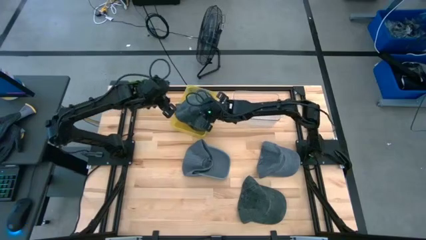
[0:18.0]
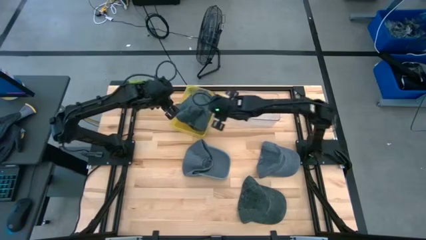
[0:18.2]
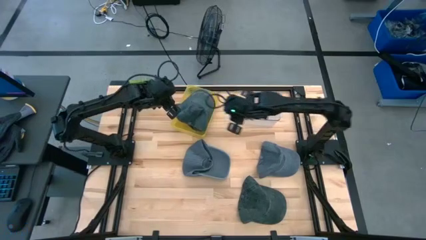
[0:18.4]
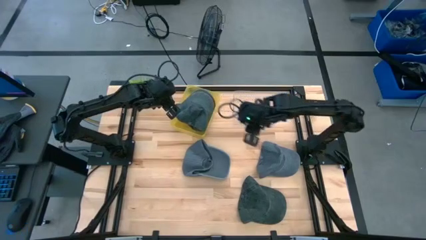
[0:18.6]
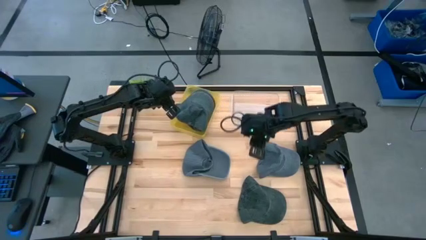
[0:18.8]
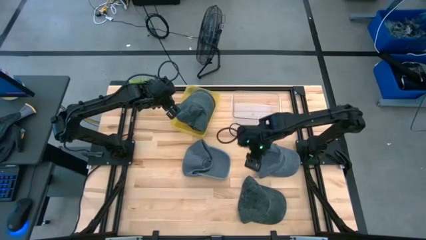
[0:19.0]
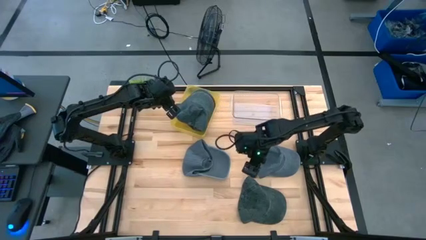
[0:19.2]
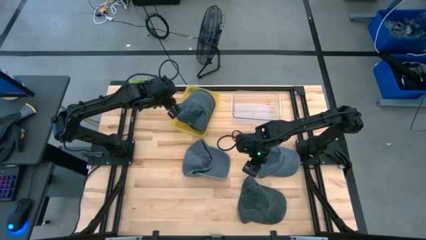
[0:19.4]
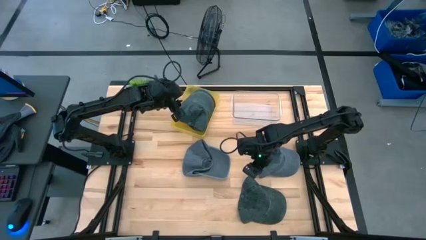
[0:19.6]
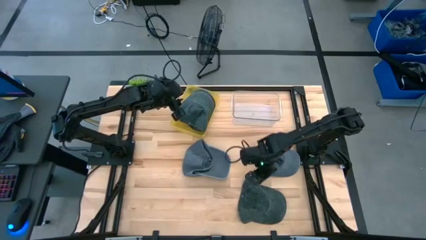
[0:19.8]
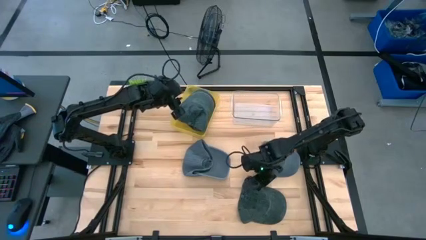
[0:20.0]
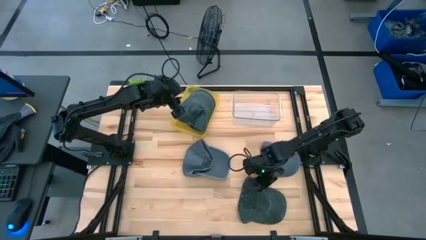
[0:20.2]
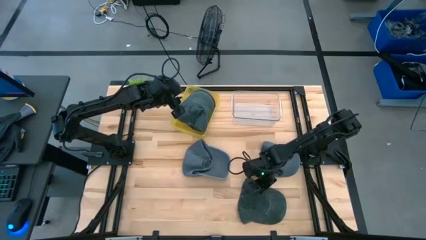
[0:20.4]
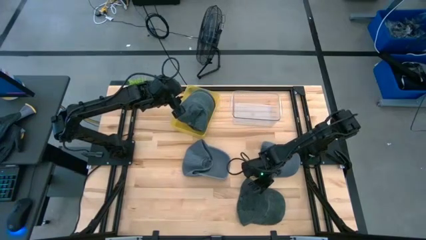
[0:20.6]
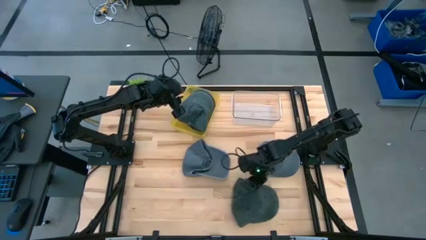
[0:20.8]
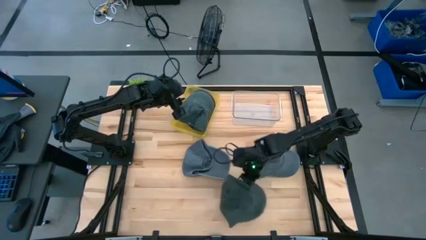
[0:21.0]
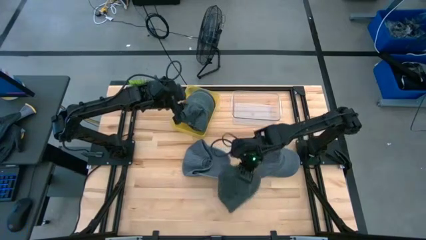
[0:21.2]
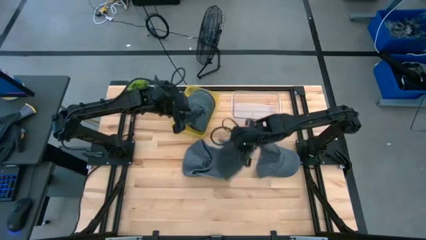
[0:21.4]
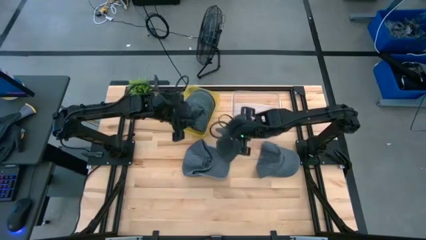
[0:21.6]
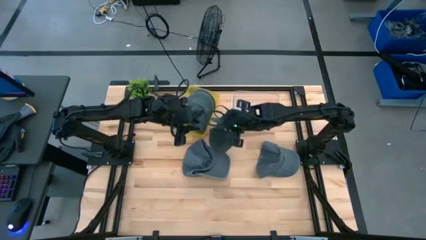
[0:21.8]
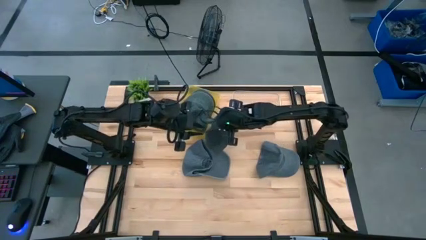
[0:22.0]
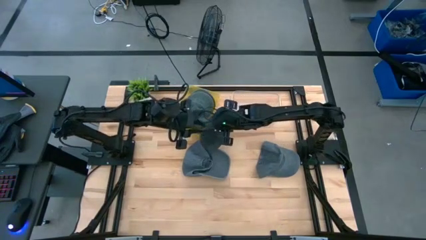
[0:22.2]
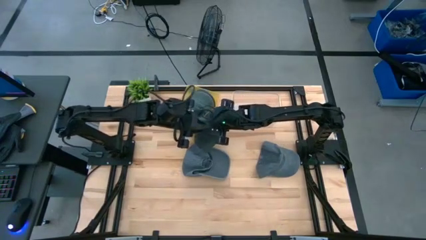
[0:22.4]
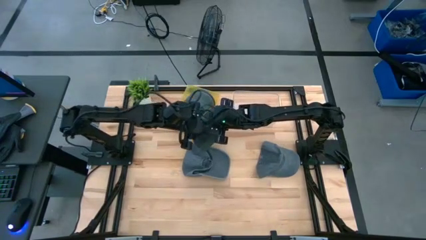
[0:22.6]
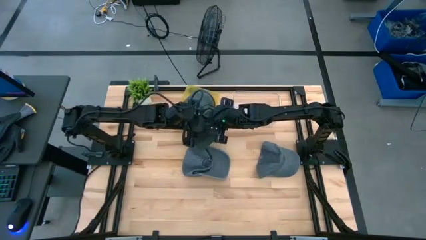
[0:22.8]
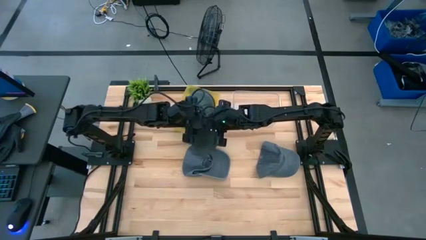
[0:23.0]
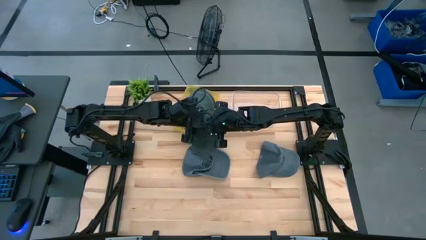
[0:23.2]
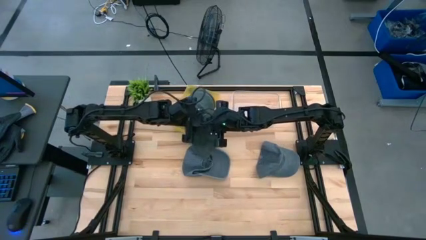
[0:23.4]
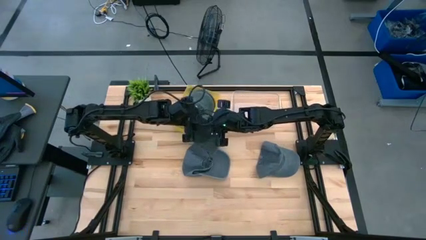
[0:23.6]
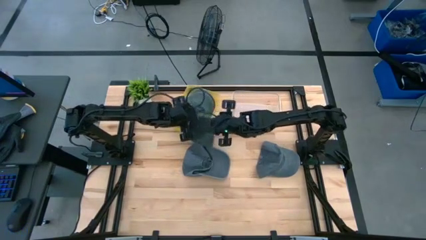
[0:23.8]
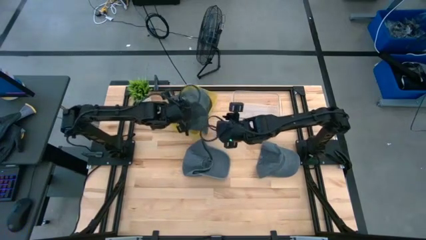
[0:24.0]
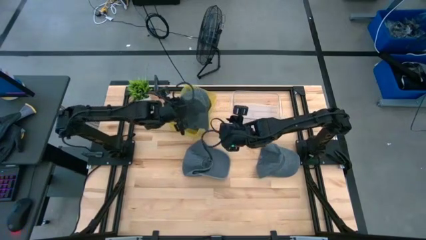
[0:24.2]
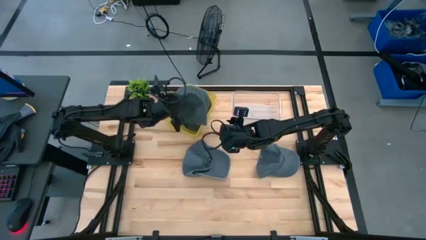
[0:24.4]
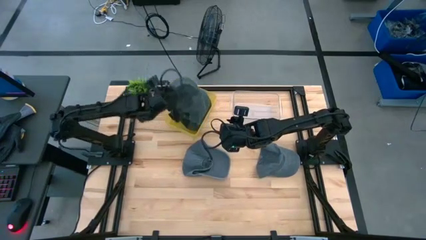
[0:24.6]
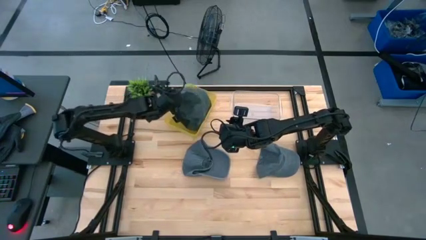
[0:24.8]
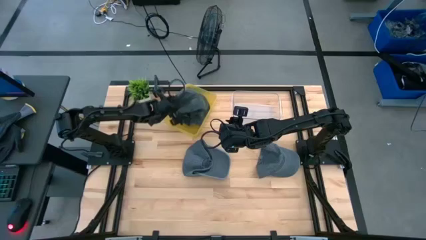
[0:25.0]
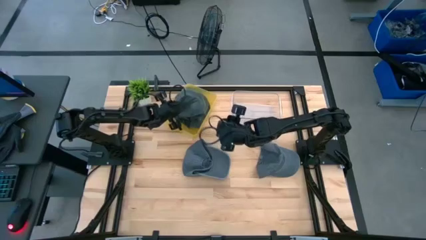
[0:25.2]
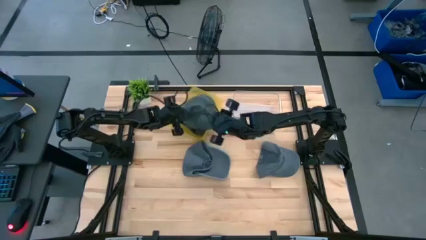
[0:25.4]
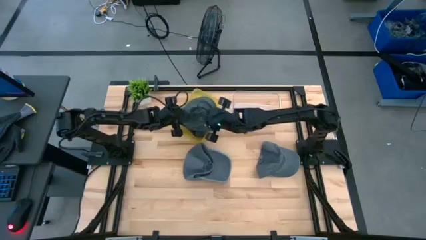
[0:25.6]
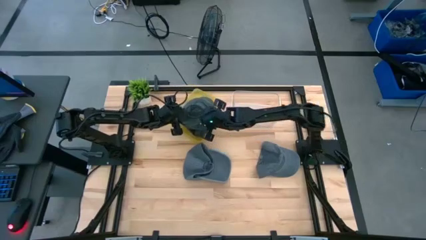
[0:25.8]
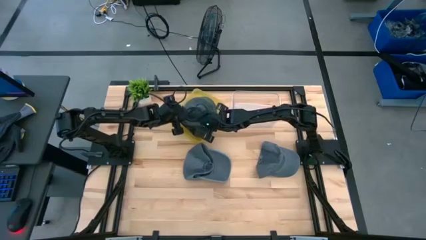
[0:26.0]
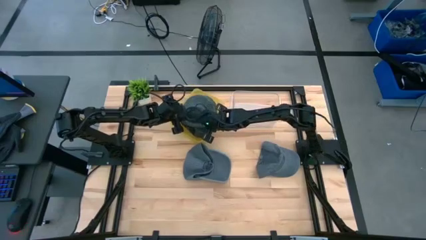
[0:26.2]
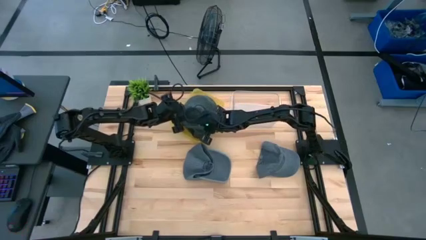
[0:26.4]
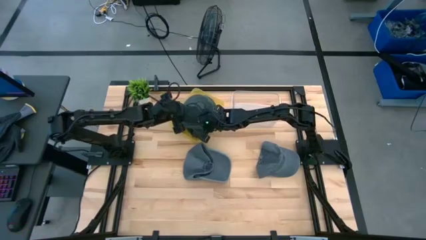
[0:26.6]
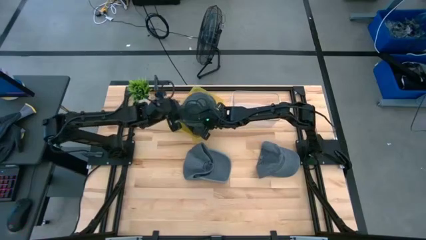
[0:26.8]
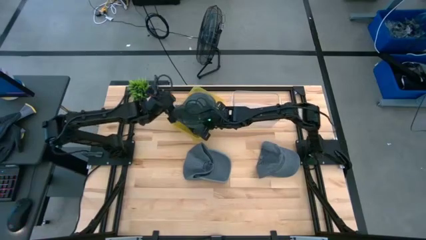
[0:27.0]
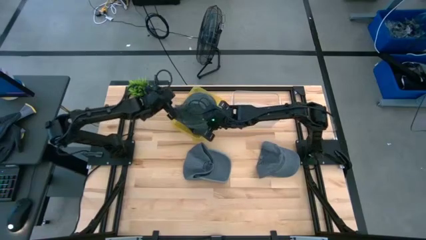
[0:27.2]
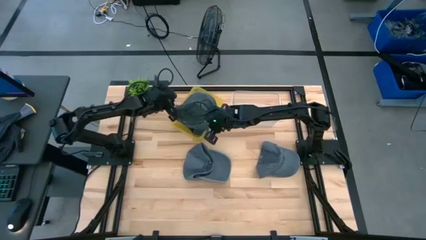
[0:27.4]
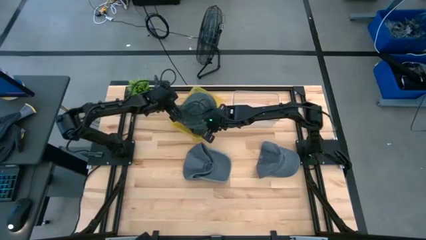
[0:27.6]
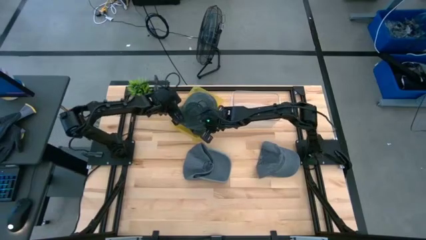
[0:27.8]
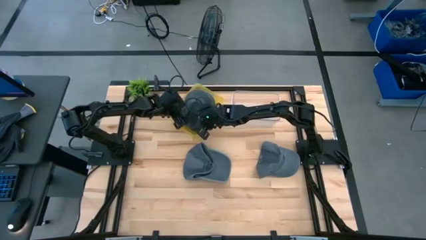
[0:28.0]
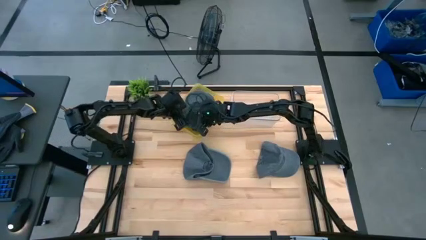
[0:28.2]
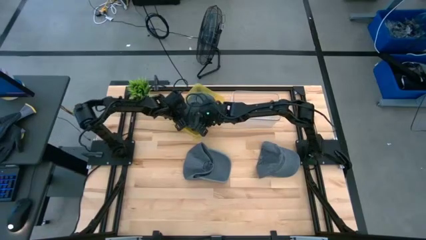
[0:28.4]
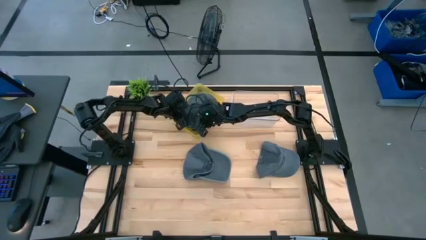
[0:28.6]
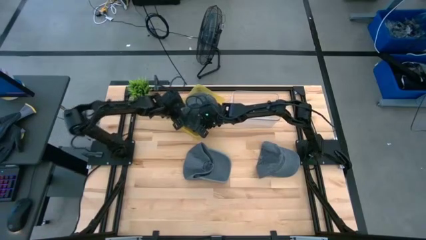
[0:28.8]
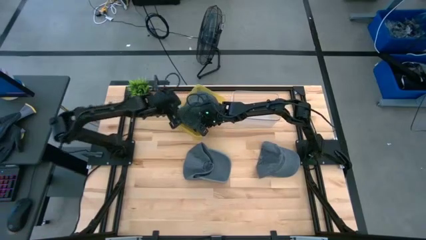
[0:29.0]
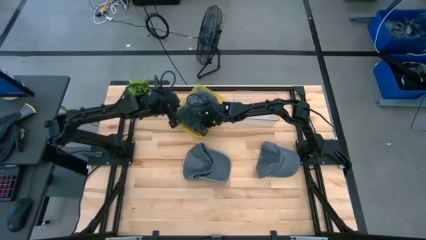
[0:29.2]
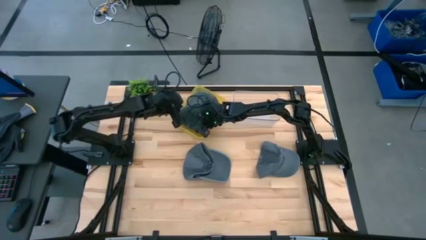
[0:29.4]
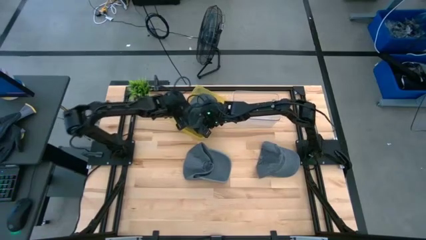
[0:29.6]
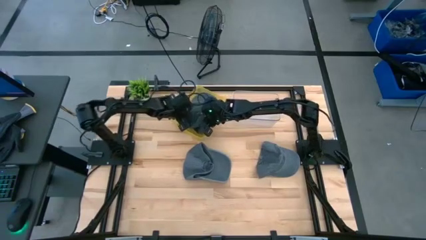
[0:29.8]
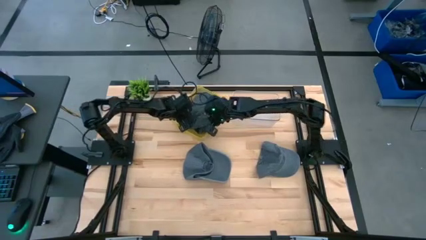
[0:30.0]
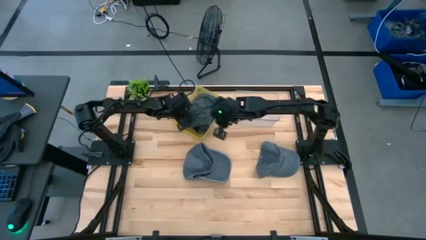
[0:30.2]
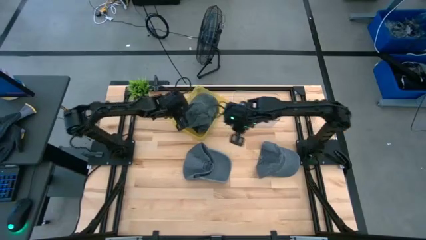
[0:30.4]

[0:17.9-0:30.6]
Task: Pick & Place hat
Put the gray cap into the yellow bin

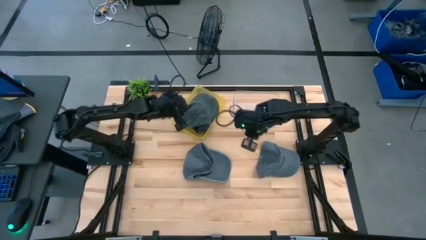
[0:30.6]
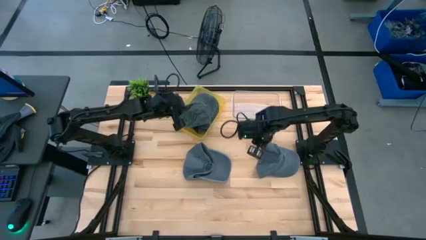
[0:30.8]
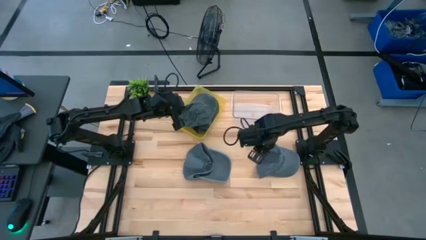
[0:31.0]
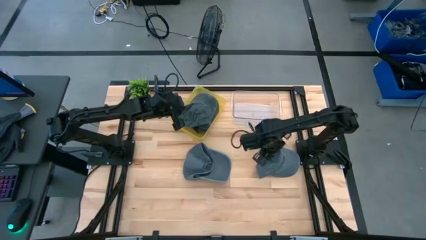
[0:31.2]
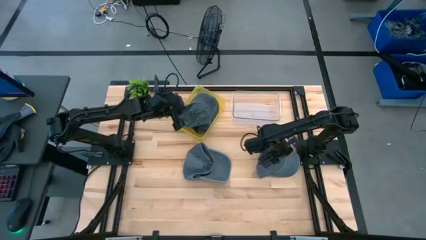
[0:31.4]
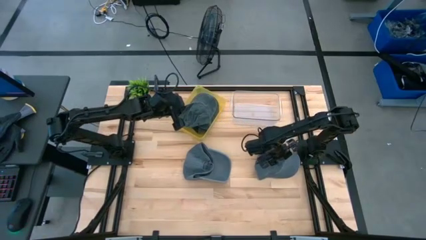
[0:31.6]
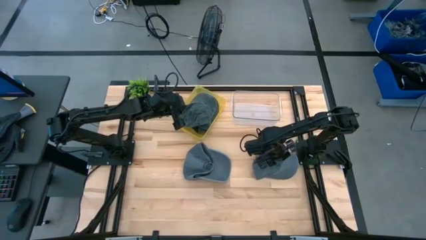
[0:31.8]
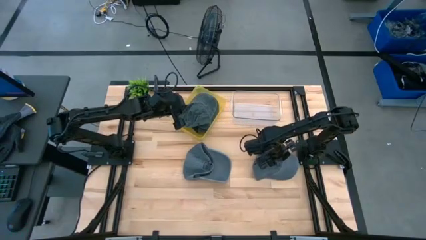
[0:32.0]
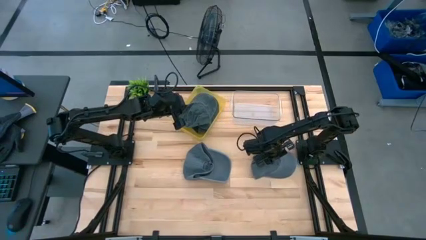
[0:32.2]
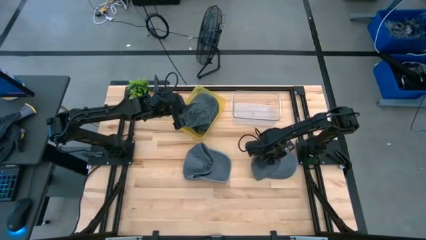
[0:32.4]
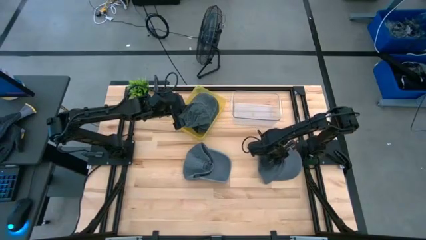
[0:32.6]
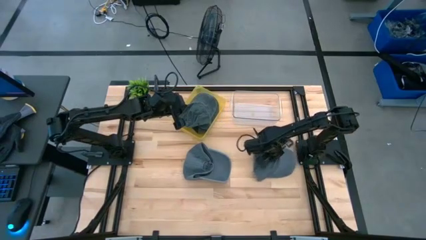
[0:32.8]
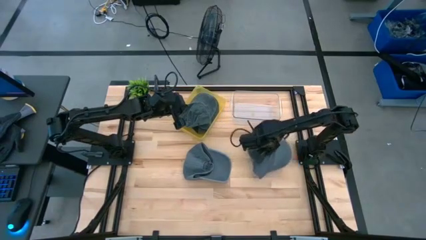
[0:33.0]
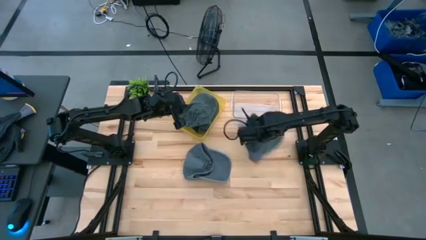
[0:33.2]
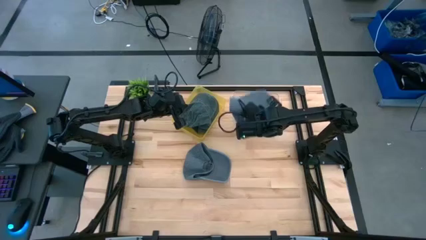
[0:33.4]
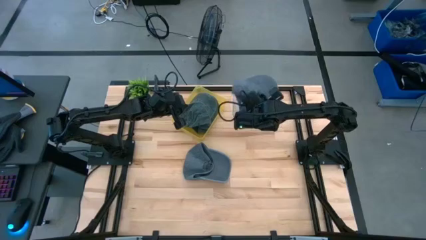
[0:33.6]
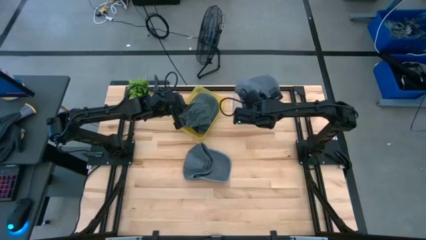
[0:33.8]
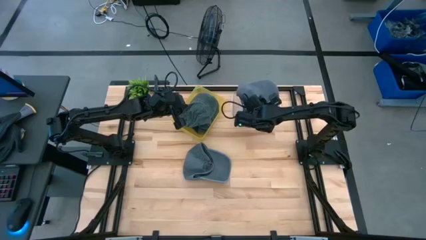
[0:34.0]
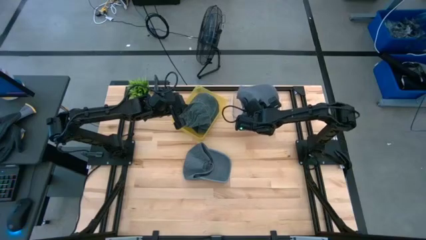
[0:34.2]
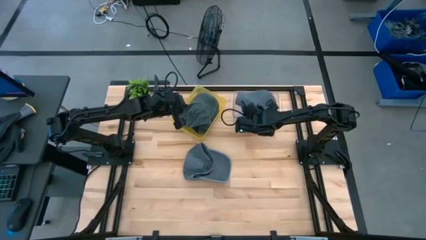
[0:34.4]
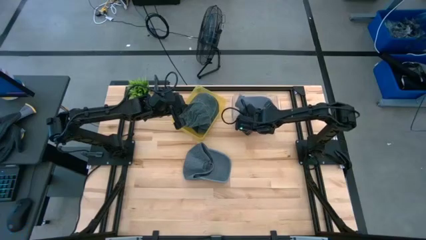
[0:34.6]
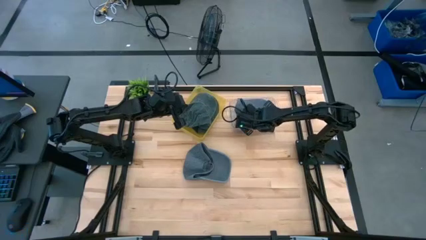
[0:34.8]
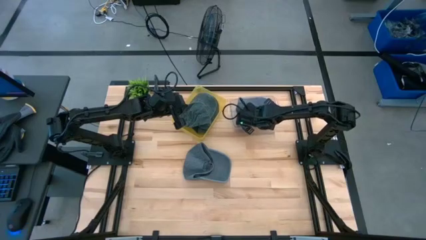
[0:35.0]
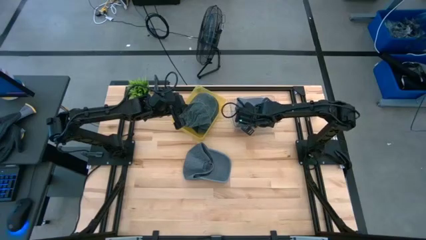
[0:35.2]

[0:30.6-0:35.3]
Put the right dark blue cap into the transparent bin
